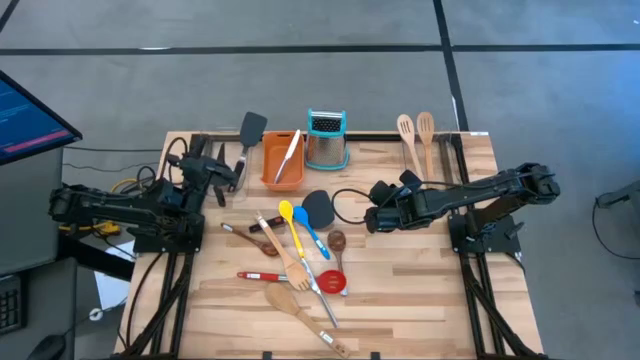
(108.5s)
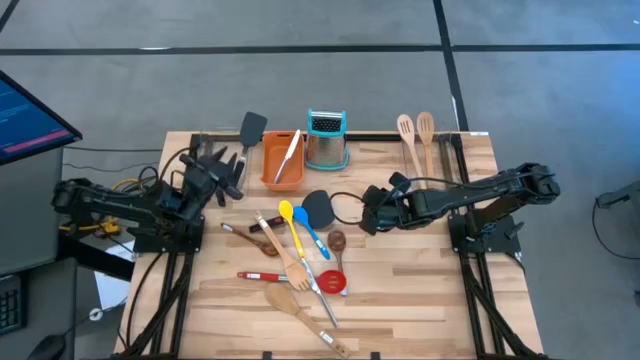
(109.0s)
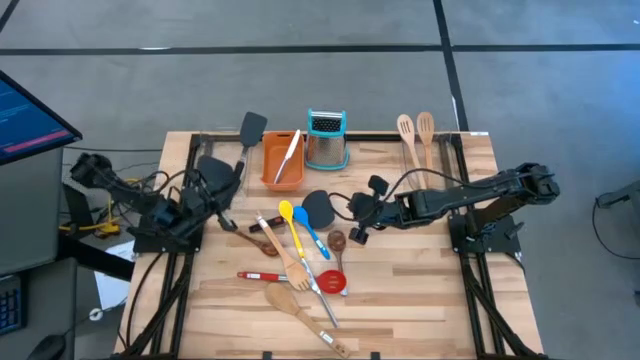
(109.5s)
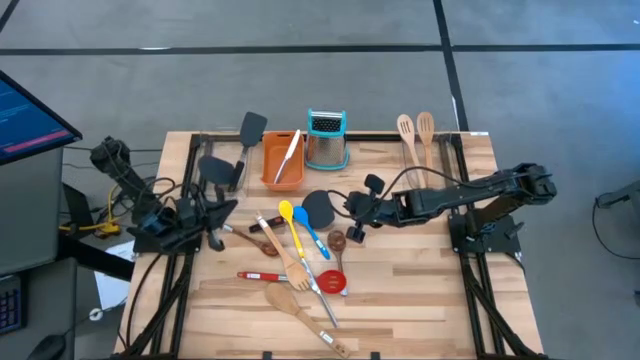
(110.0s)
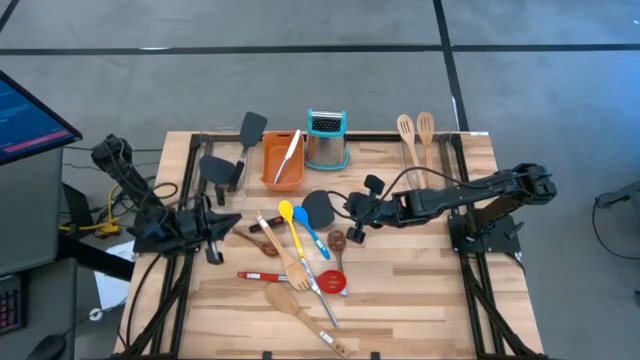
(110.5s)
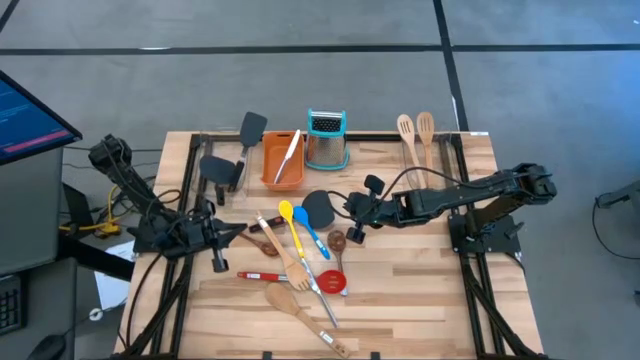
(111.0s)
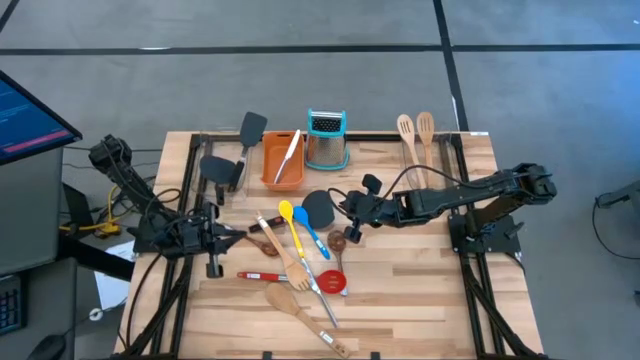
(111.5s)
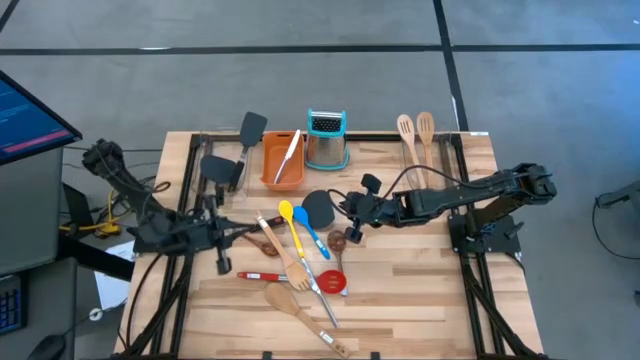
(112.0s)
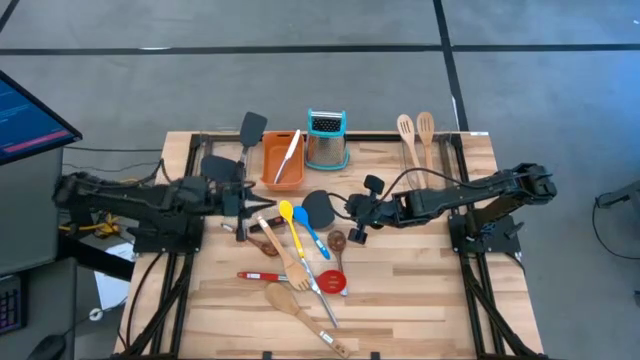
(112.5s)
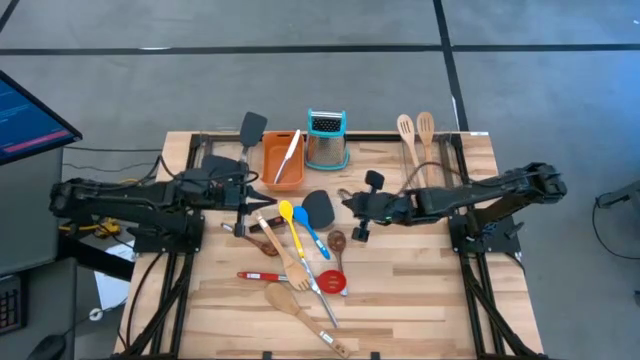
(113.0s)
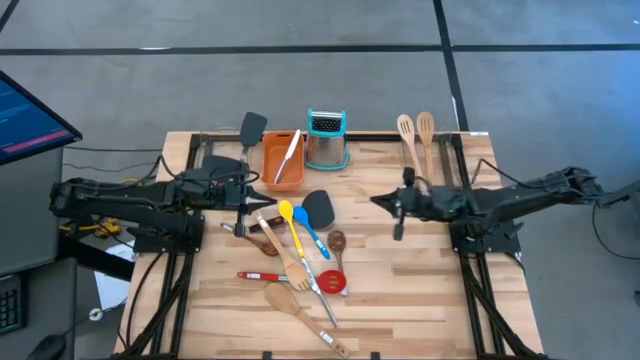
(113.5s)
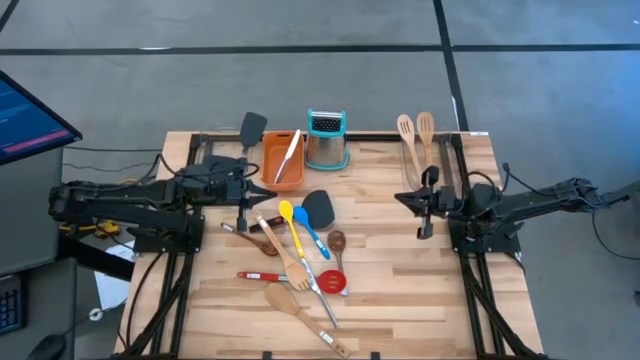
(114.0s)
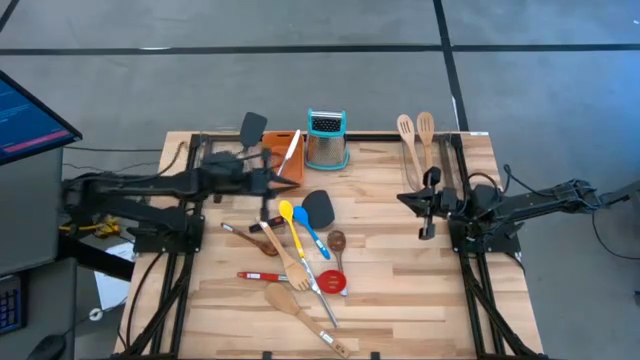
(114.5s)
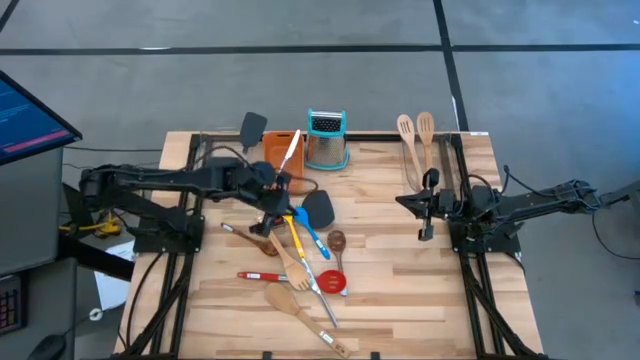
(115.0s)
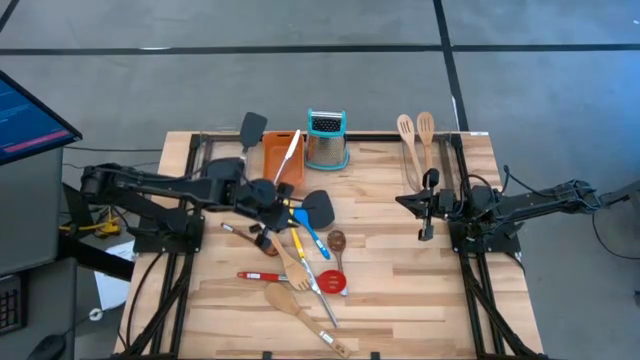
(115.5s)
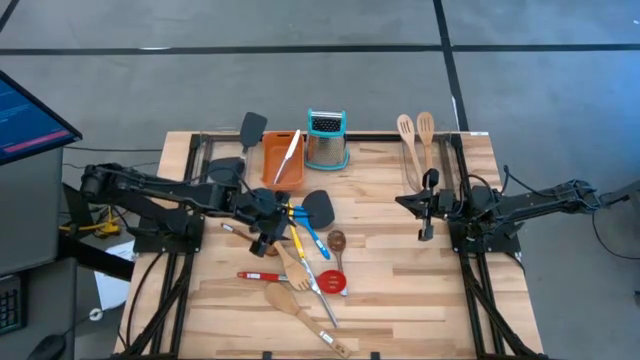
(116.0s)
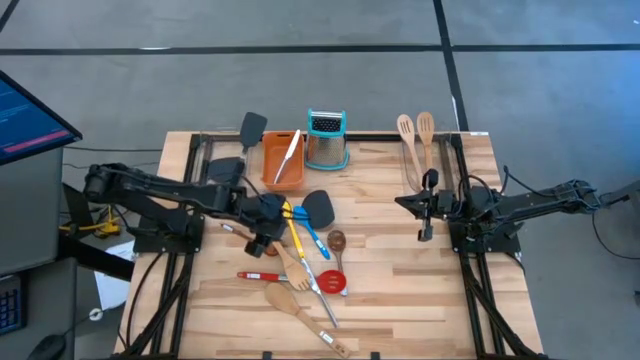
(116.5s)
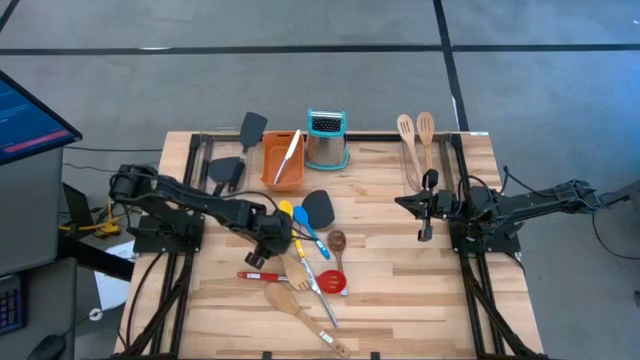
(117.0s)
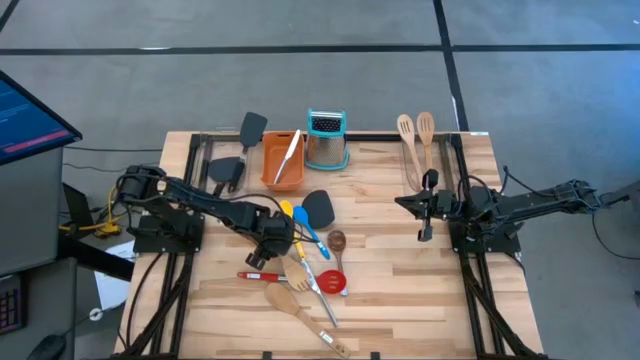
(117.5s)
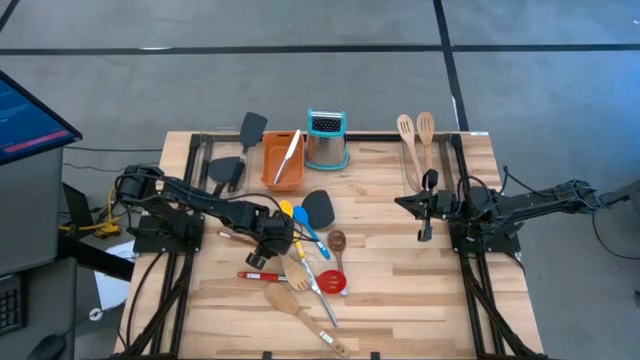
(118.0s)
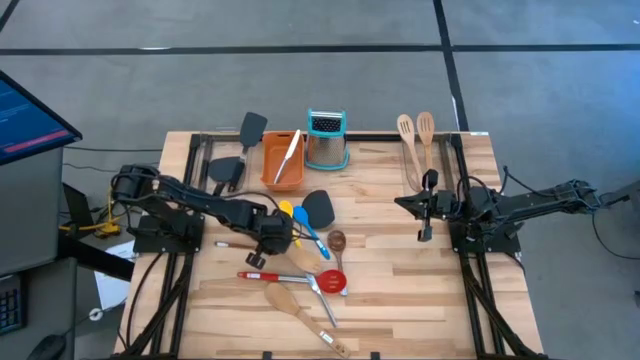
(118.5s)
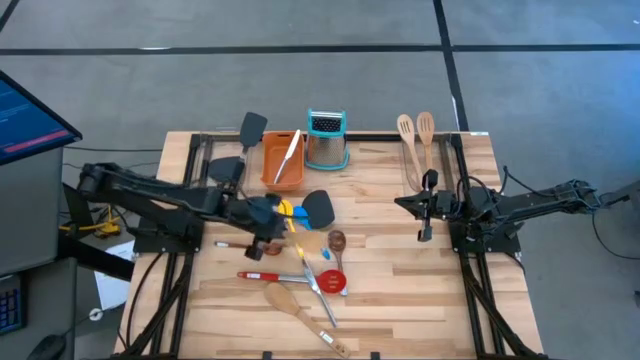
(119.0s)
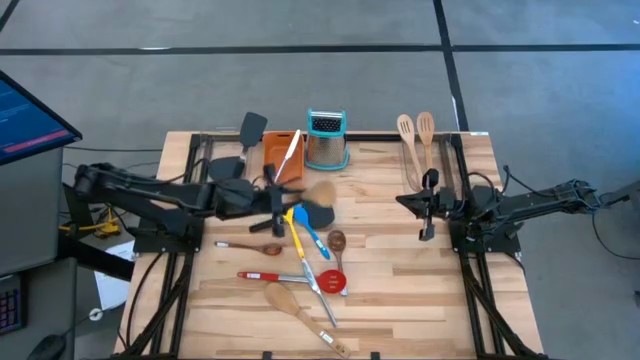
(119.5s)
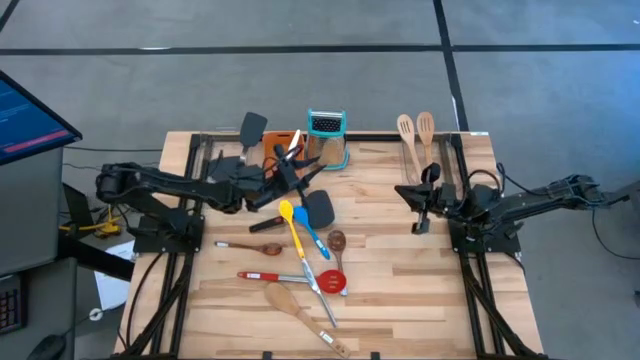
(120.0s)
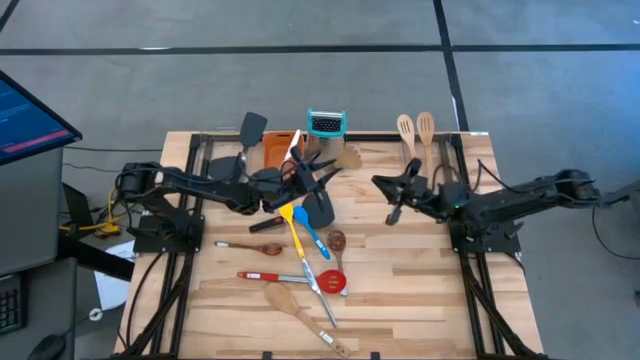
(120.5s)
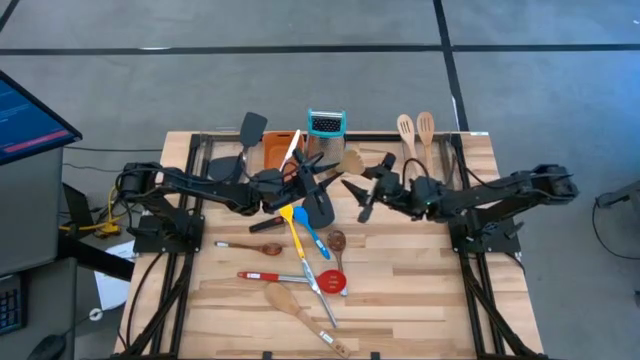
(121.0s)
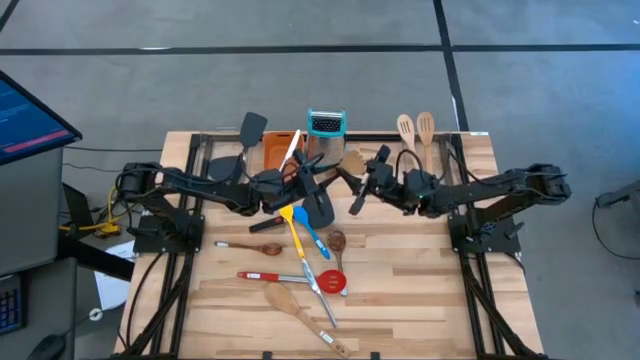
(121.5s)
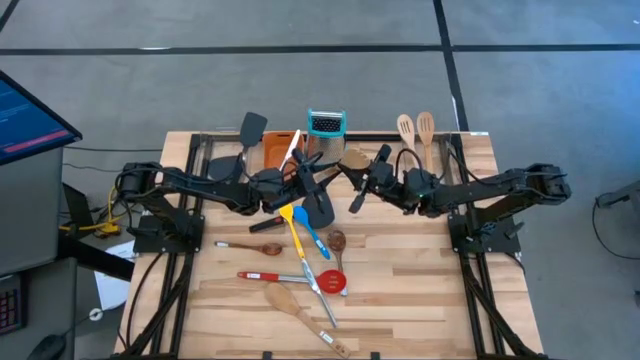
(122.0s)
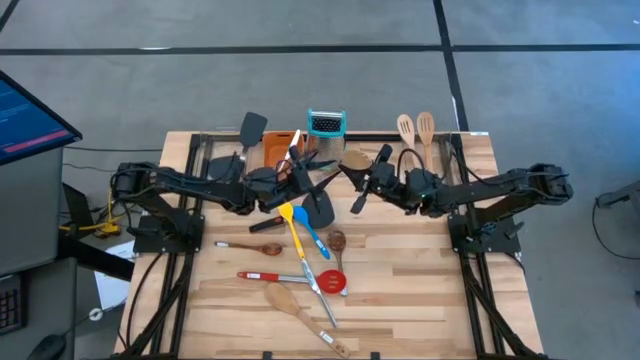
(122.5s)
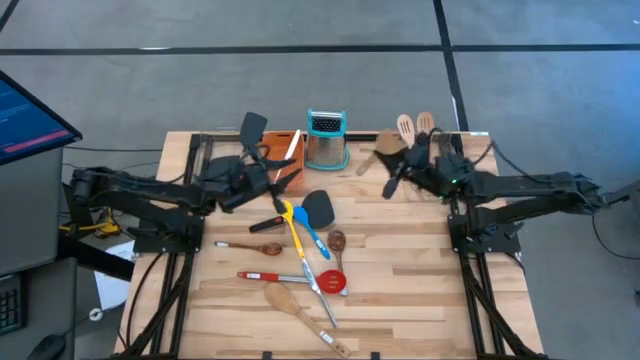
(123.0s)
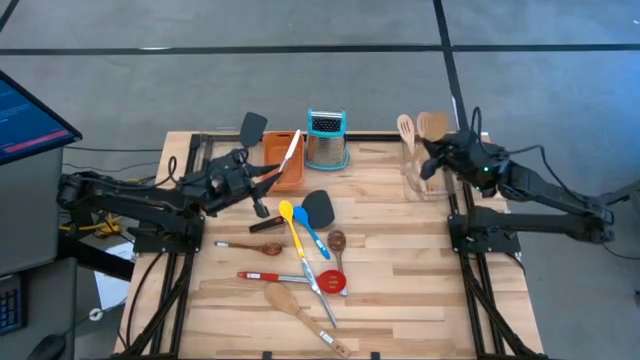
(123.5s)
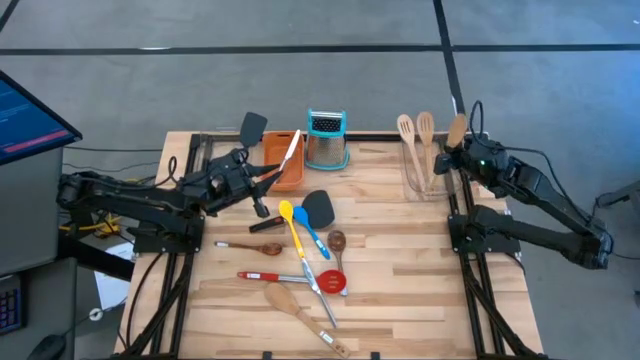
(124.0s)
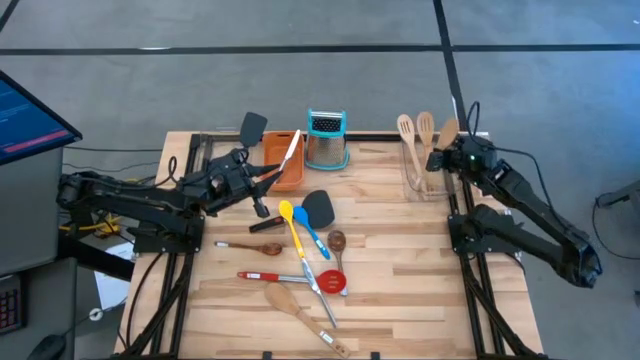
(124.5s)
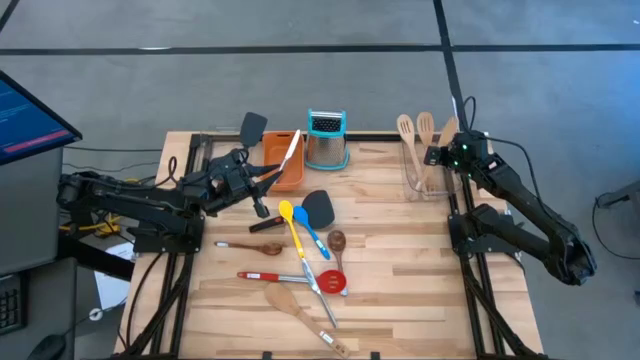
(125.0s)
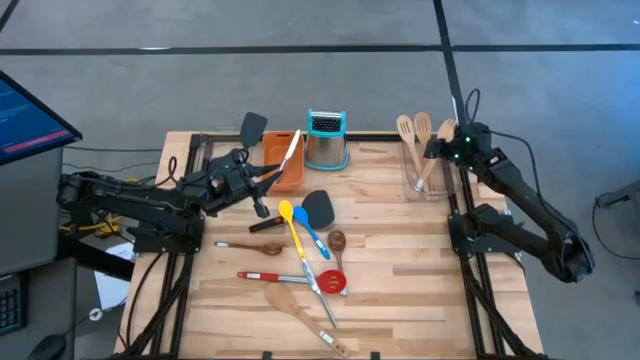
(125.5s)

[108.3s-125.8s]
Task: Pick & Place Kitchen Items
Put the brown wooden spoon into the right transparent bin

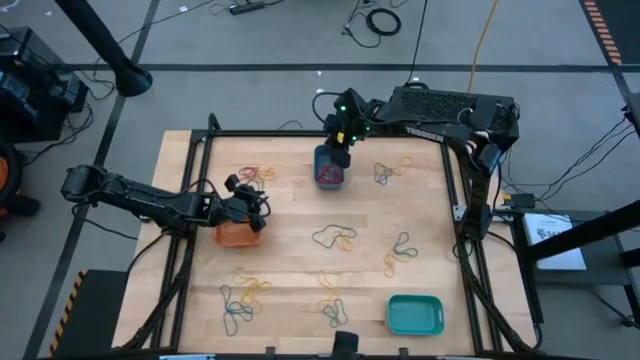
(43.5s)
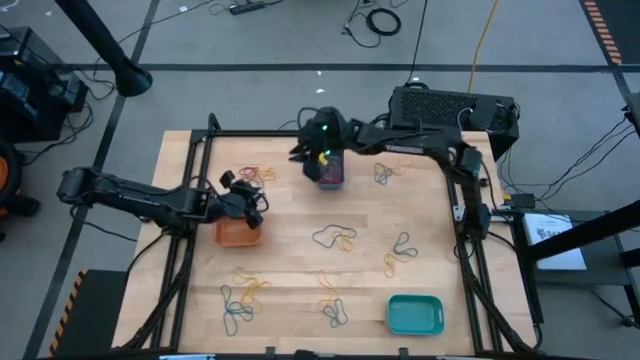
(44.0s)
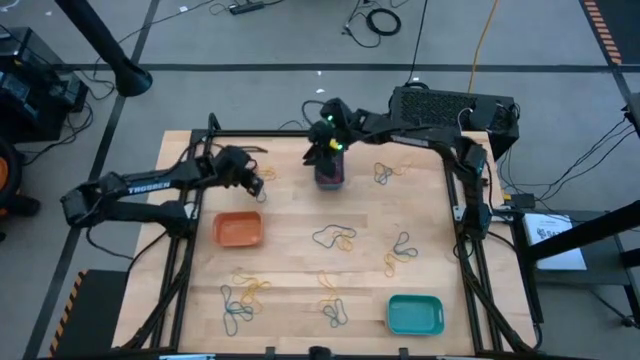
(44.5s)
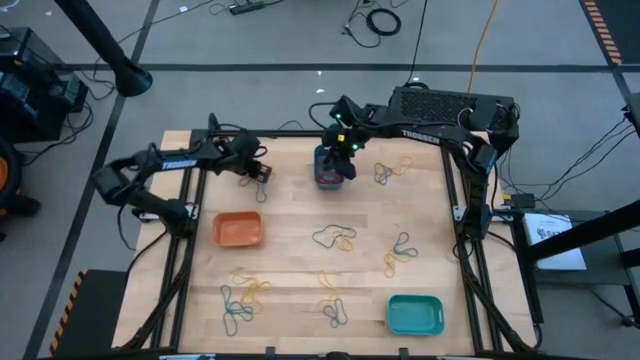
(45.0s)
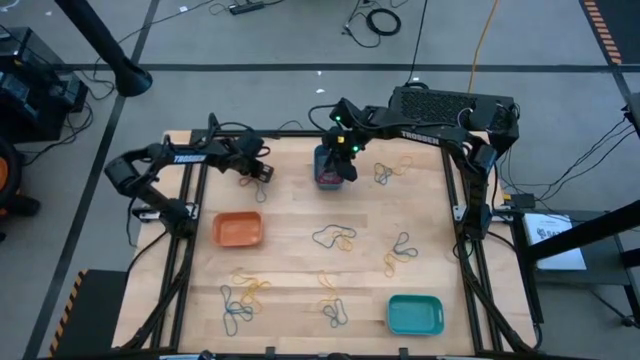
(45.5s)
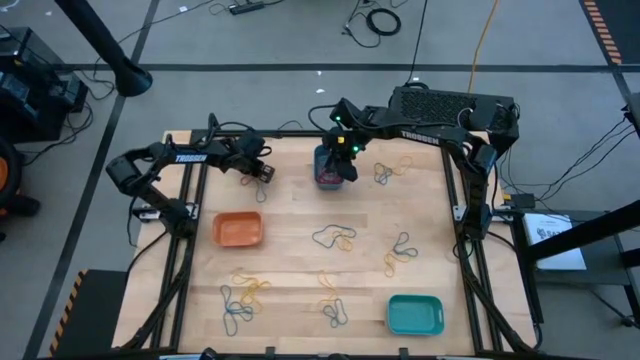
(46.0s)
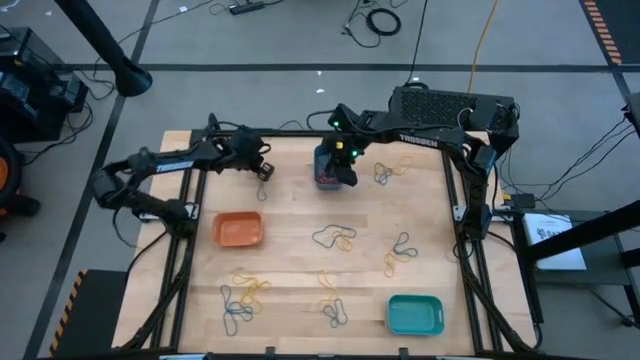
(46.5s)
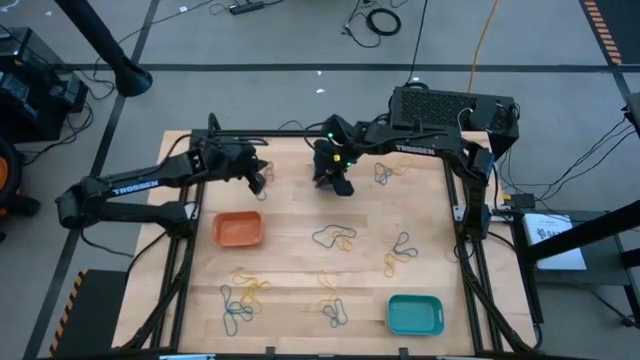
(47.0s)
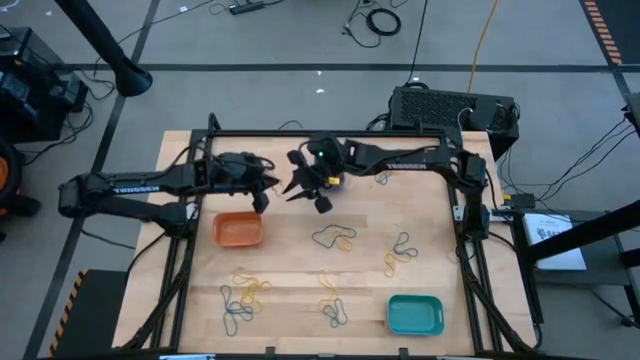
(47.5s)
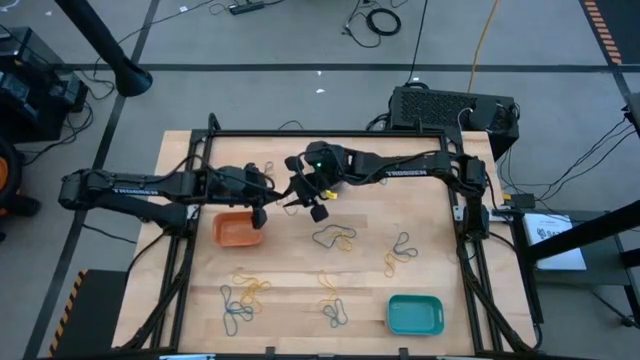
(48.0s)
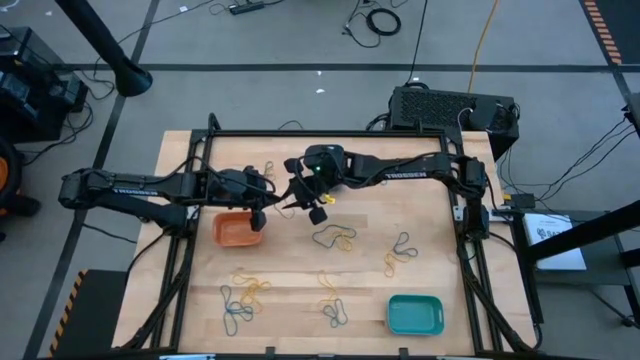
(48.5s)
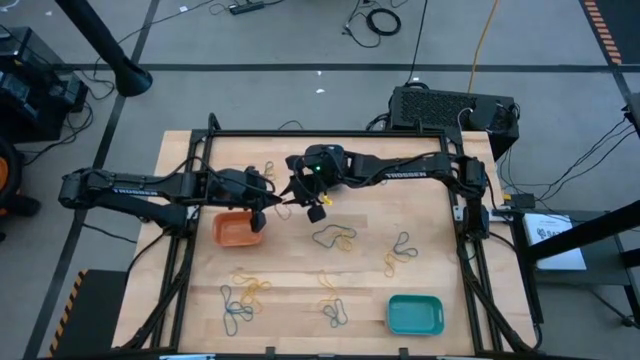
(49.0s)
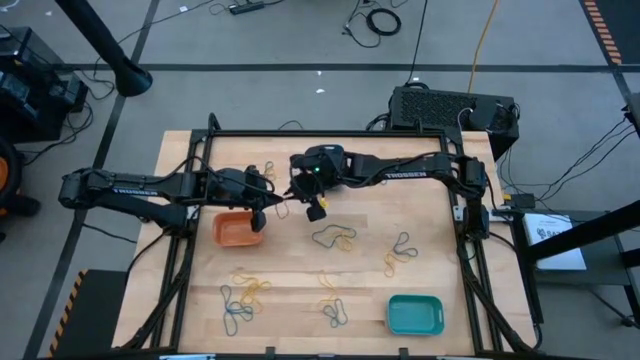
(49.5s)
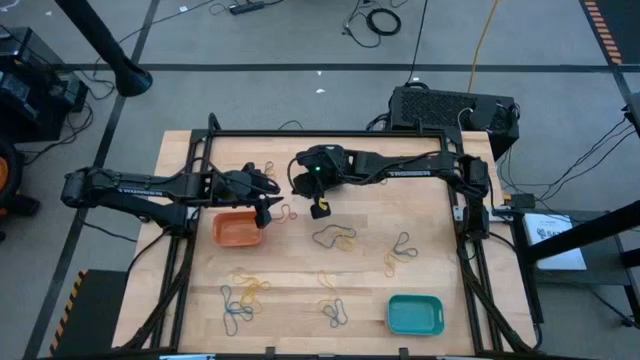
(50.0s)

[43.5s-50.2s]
Task: Sort rubber bands into baskets
Put the red rubber band into the blue bin
